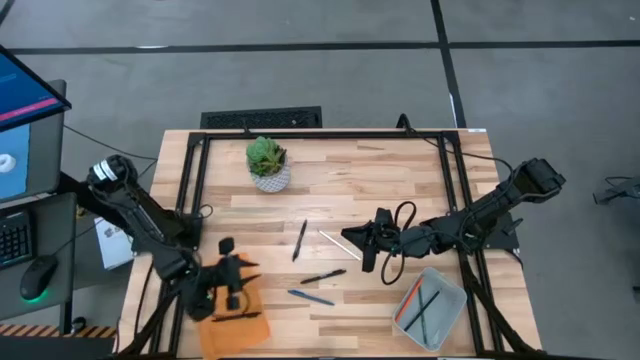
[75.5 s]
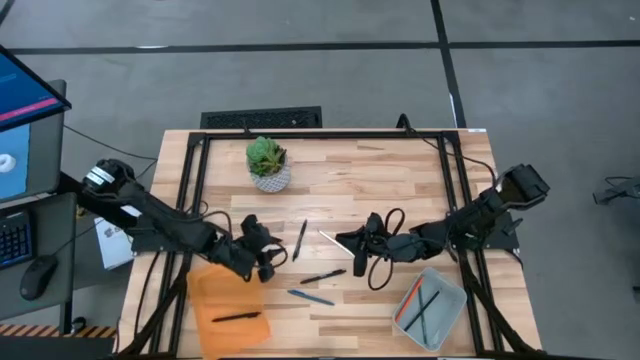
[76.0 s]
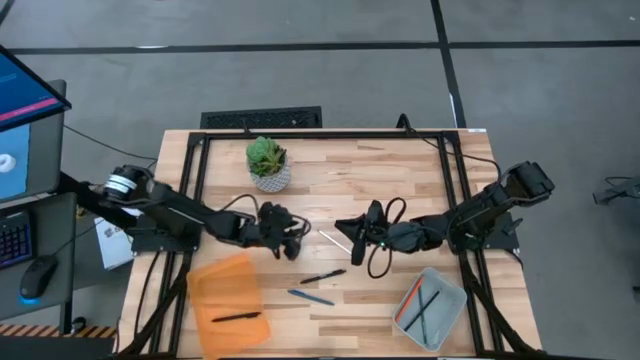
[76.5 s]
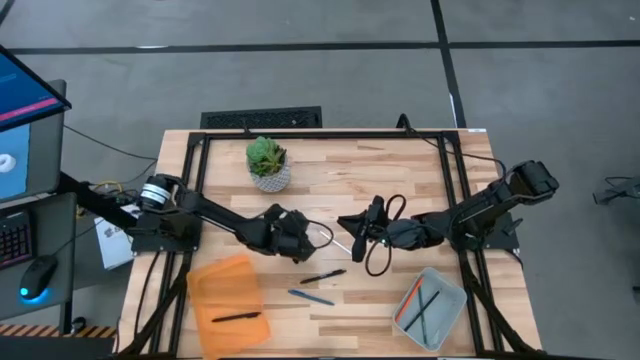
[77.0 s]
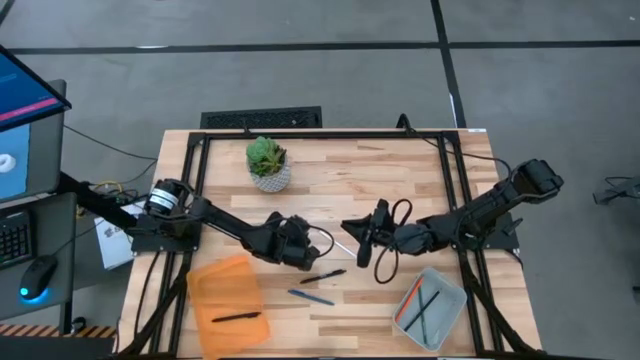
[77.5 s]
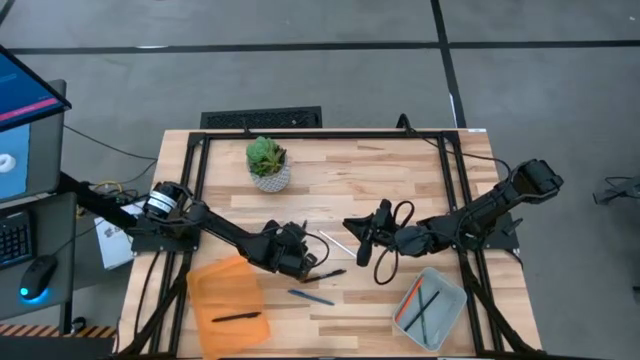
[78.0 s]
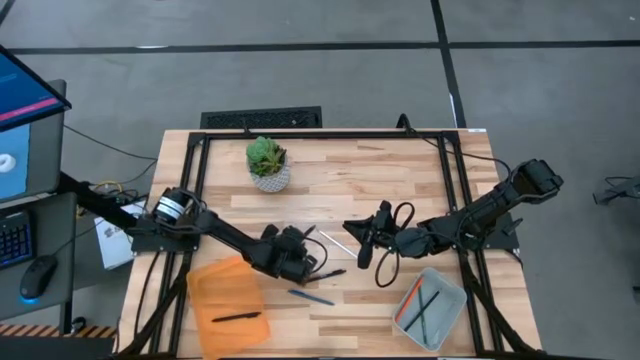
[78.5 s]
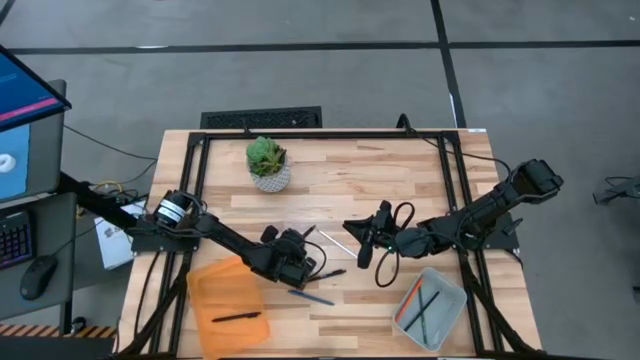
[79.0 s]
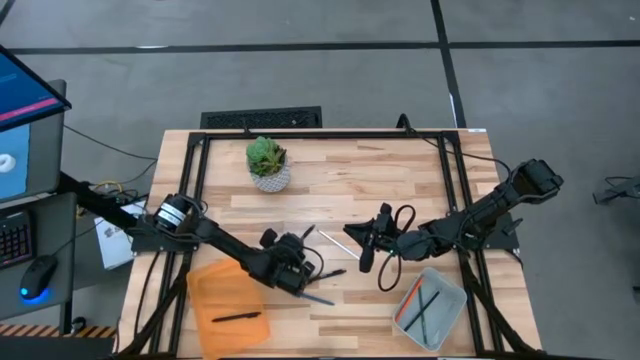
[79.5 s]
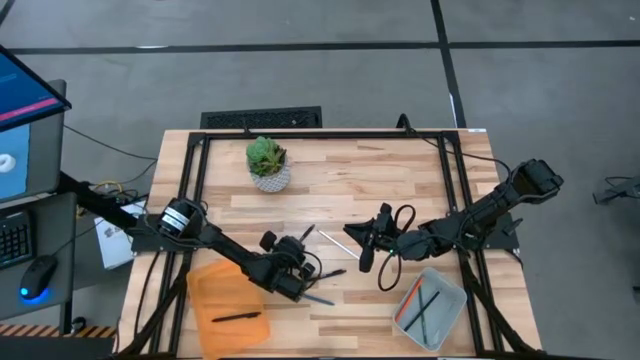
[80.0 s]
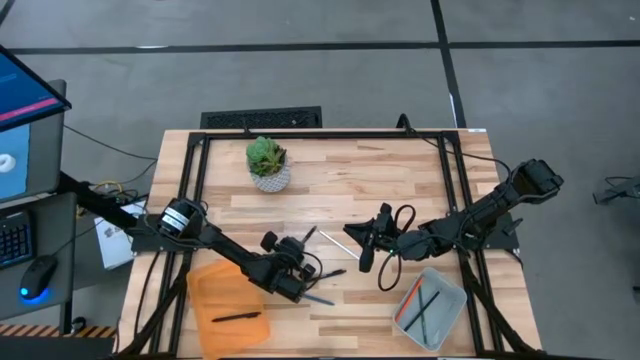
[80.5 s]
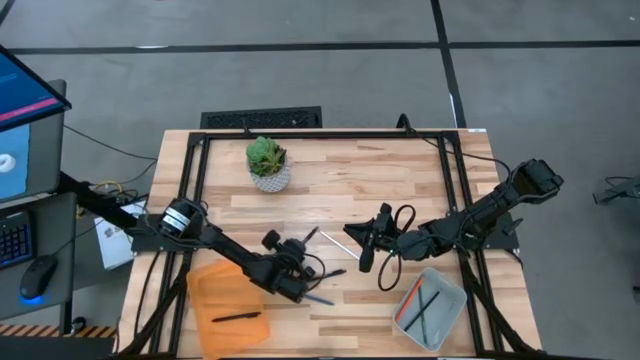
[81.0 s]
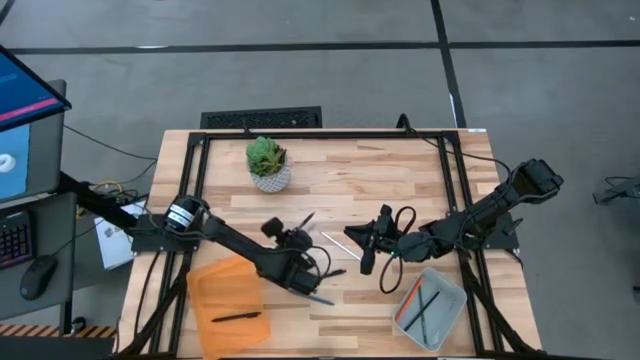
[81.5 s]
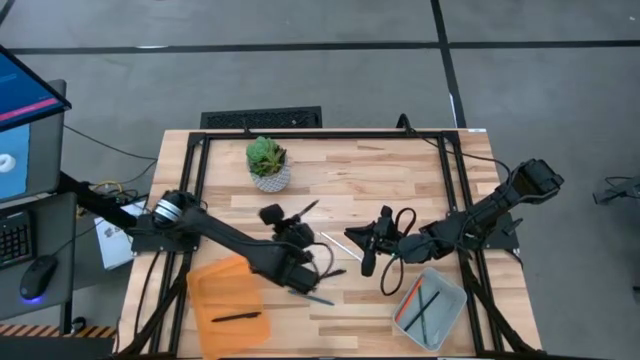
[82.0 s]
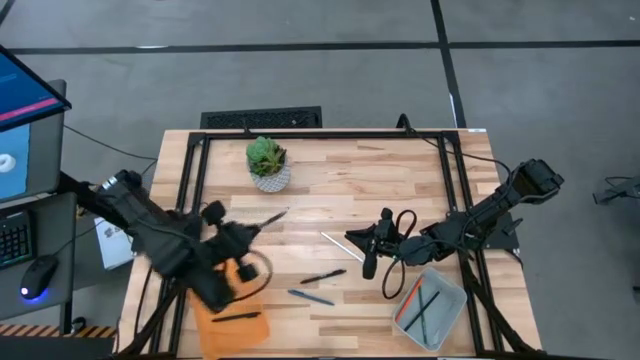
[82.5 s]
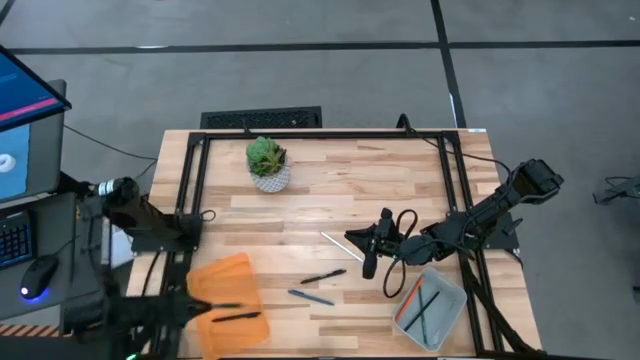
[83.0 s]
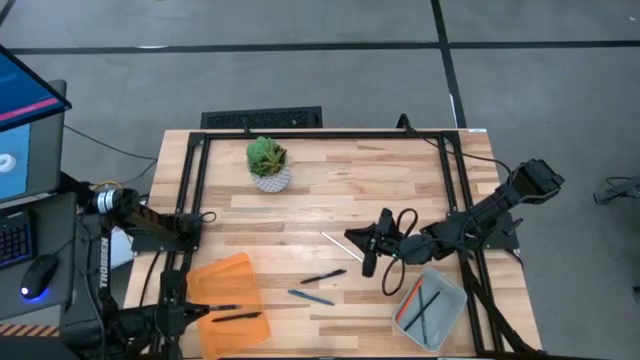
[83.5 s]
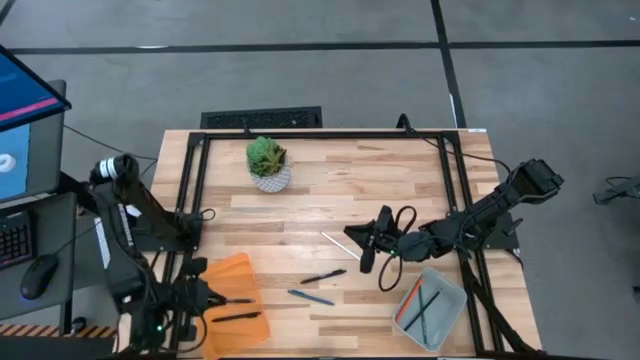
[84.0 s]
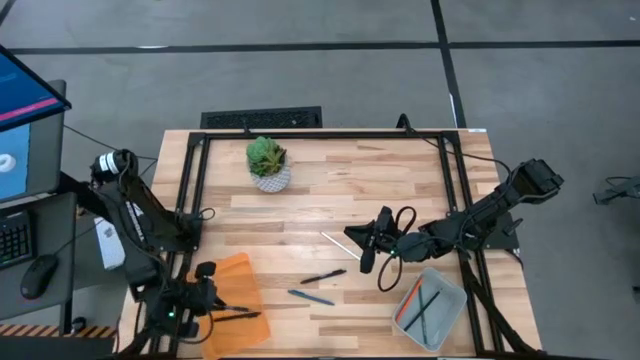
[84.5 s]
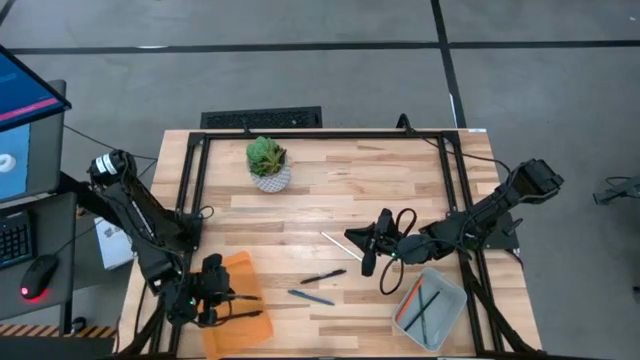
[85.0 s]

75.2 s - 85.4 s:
Task: Sort pens & pencils
Put the black pen into the orange bin
